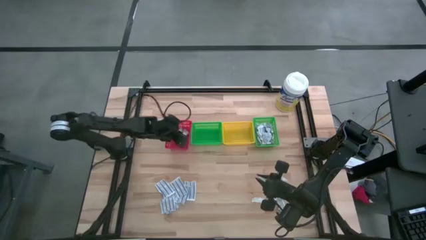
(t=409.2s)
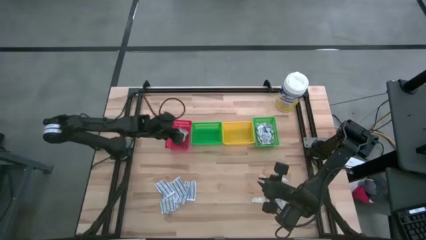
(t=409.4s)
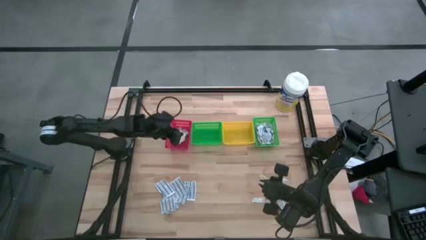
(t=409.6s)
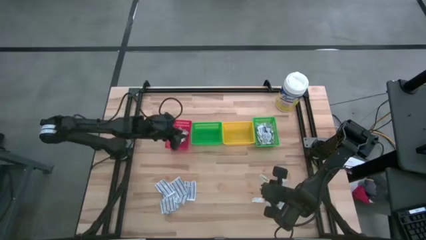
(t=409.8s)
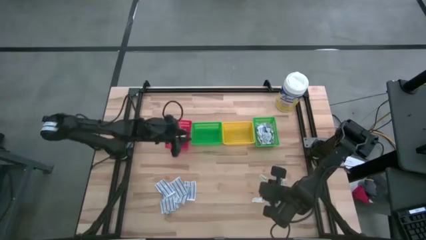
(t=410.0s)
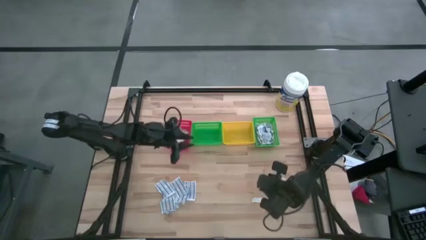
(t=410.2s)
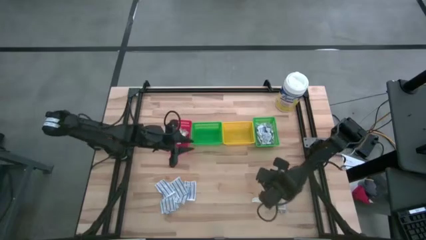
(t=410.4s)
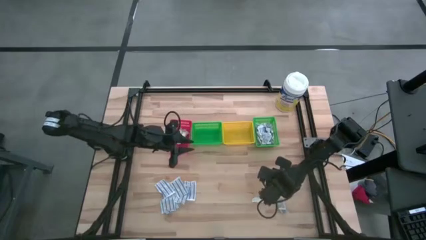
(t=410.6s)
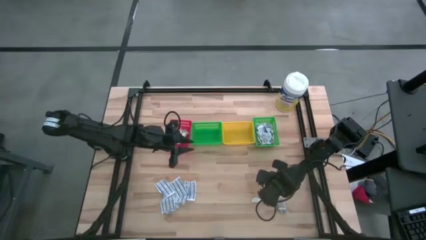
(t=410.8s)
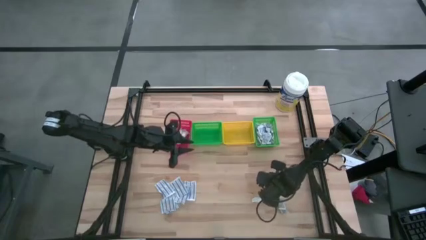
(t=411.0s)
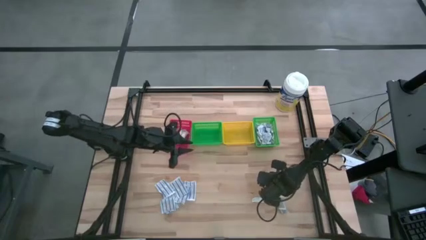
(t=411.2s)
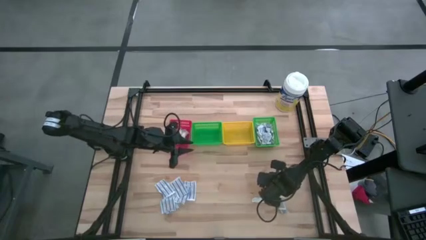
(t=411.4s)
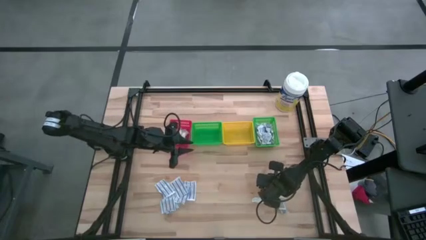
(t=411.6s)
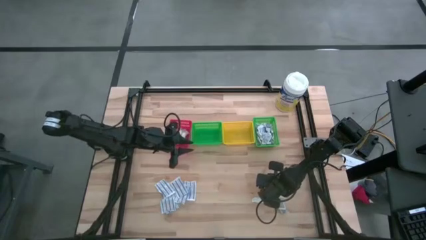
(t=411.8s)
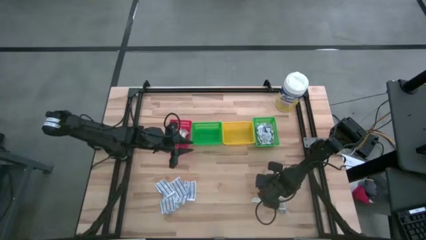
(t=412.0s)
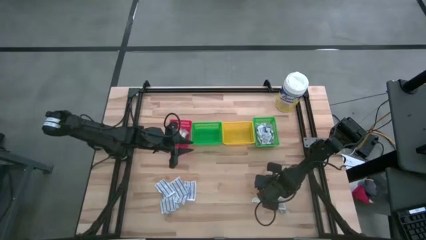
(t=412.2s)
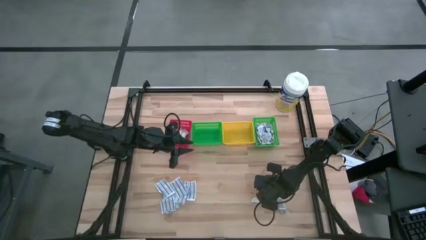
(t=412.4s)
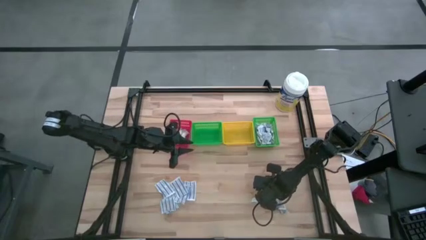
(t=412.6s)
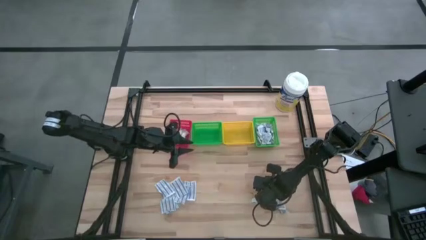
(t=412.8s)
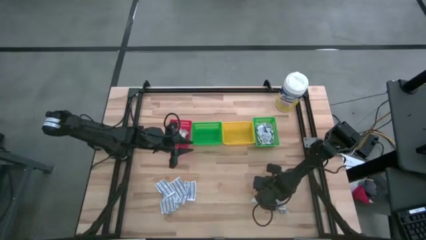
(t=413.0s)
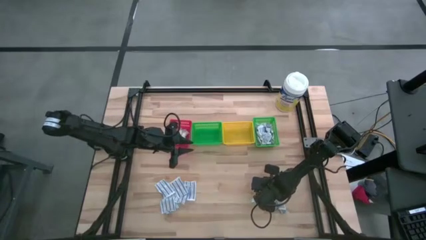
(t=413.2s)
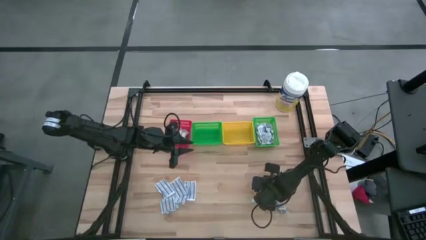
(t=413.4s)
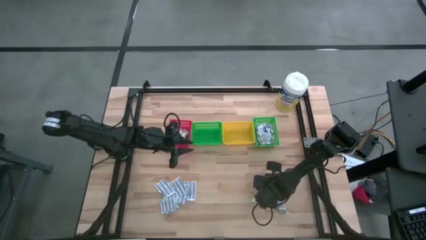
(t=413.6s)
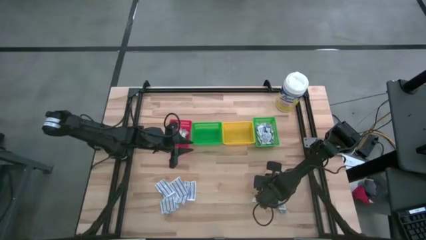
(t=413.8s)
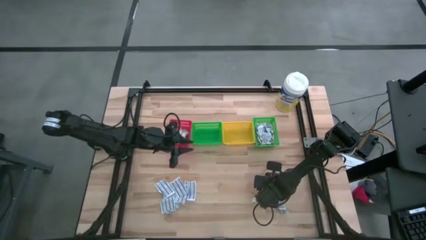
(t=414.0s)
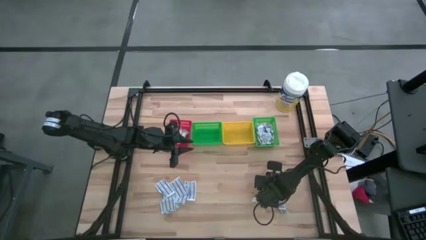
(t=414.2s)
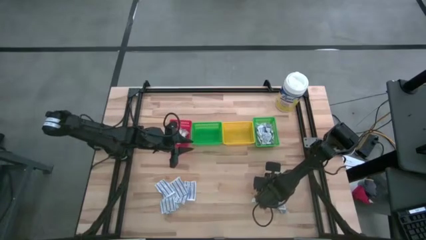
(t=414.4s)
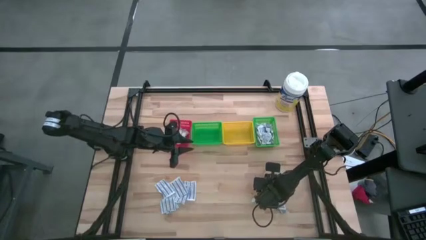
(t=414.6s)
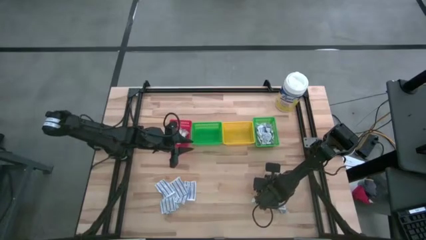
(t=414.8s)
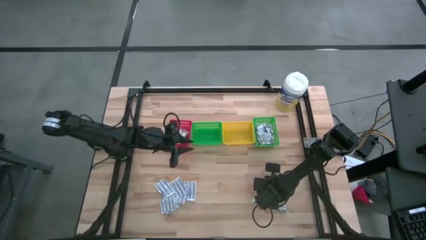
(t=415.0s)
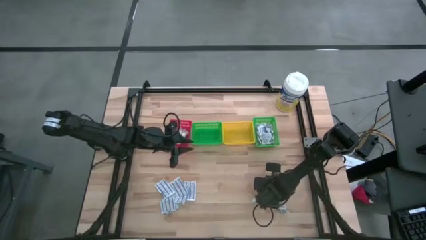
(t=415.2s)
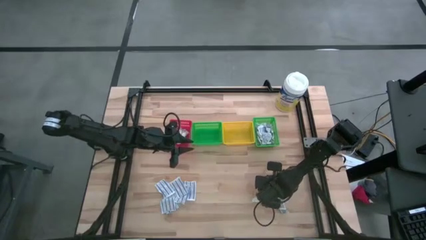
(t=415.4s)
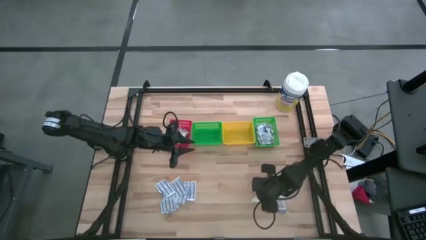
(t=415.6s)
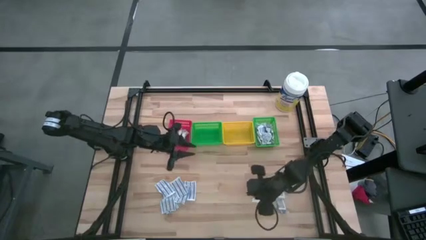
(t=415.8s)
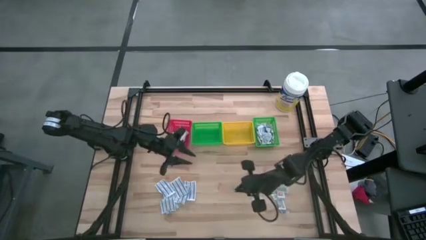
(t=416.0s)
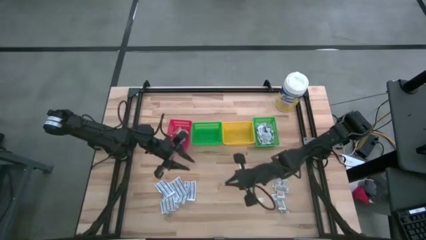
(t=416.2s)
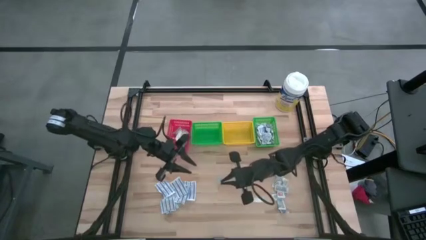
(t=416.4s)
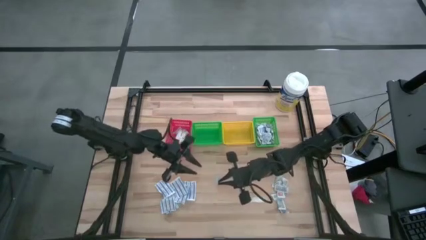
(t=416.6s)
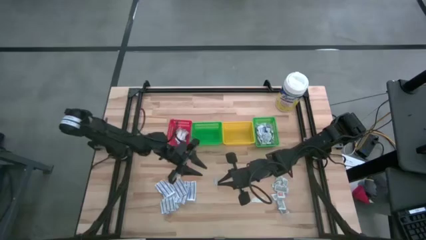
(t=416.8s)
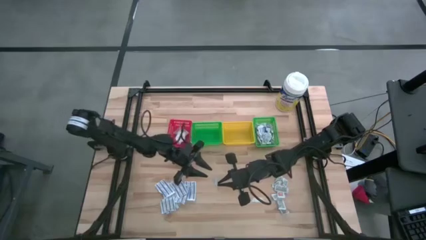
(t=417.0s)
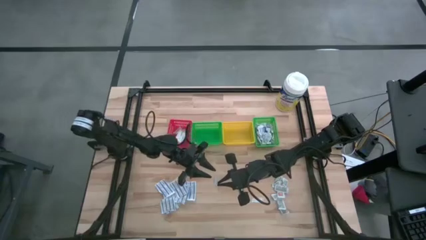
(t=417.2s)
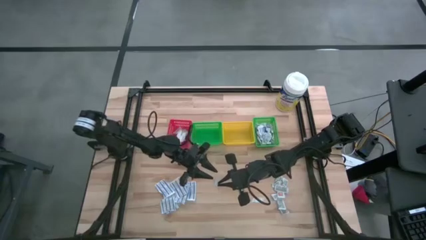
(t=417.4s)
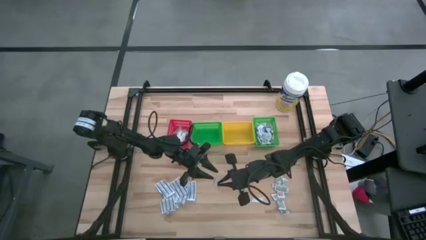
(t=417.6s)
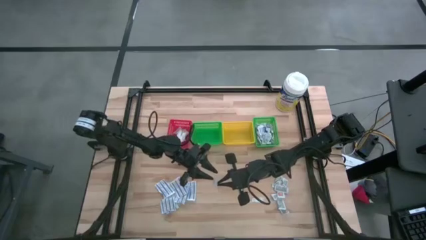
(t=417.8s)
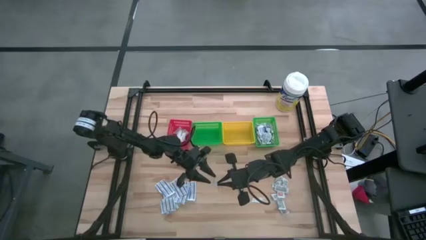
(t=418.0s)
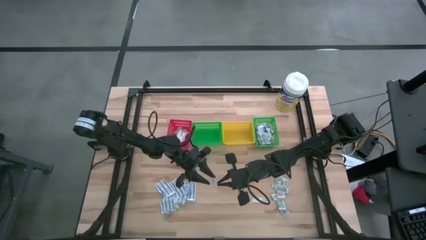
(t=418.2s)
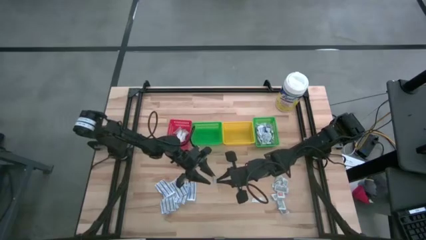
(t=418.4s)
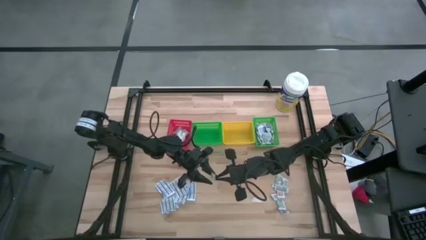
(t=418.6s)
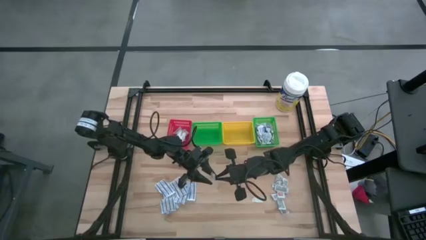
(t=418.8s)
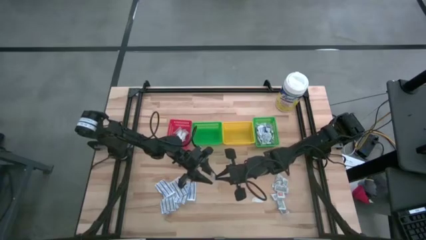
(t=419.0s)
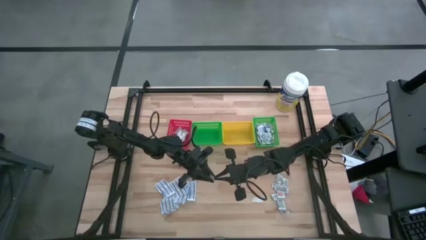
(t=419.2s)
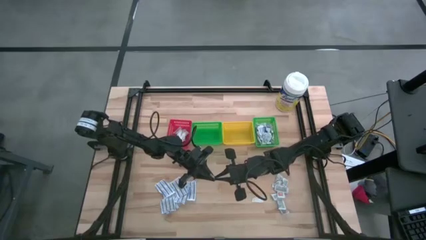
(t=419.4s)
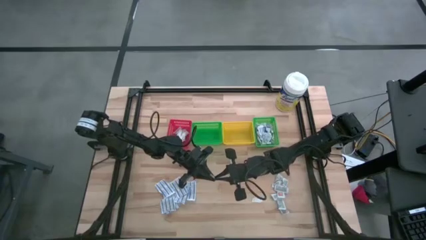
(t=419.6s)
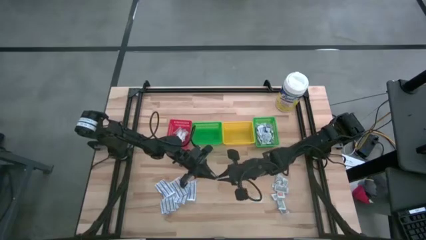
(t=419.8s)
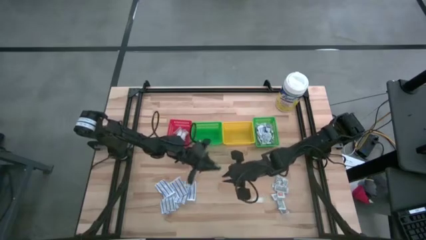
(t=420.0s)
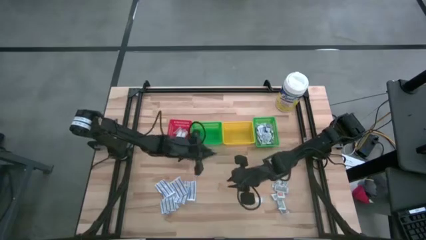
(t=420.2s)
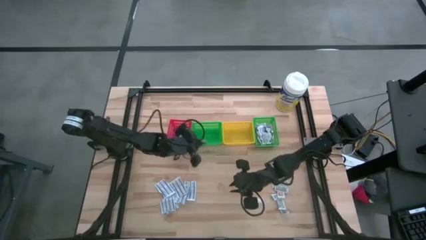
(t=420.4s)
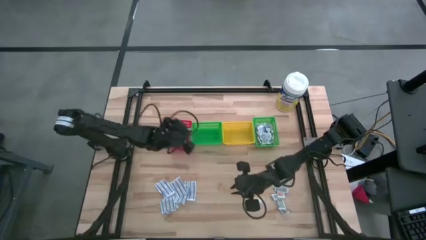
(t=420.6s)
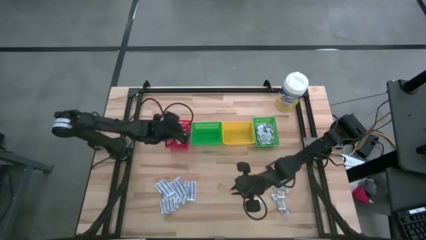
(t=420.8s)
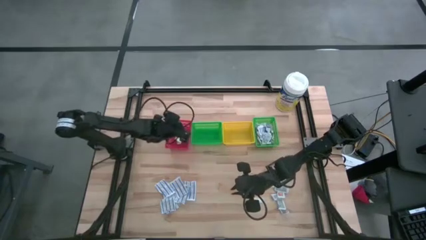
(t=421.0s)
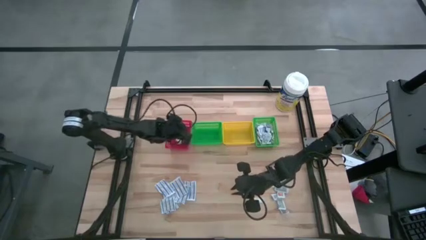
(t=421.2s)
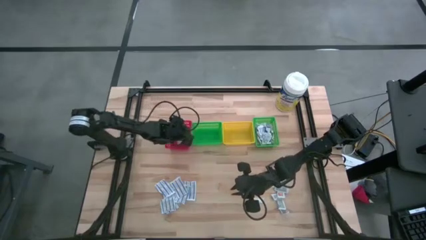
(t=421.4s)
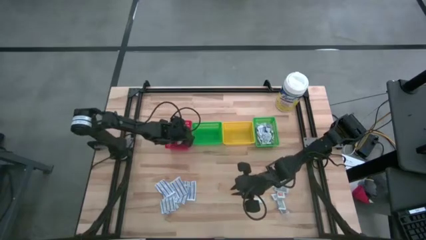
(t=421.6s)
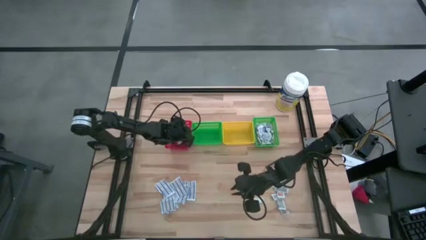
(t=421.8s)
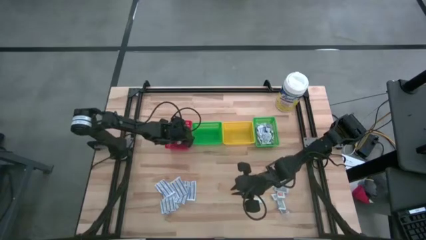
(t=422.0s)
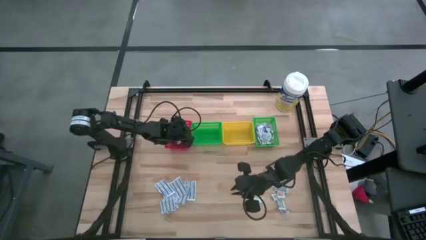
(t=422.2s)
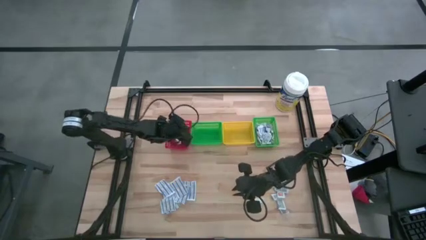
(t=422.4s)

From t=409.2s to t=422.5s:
Task: Pick & Place First Aid Supplies
Put the green bandage into the red bin
